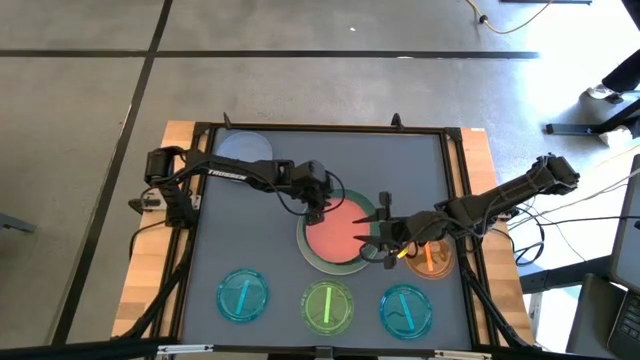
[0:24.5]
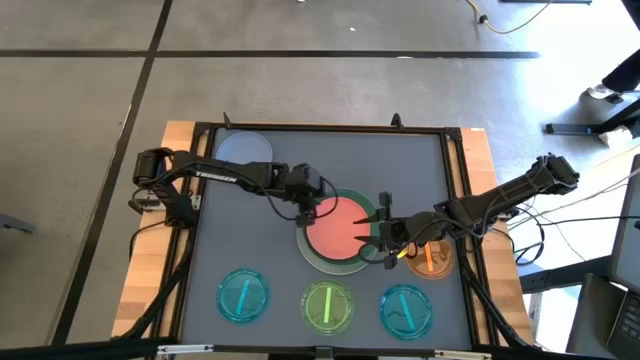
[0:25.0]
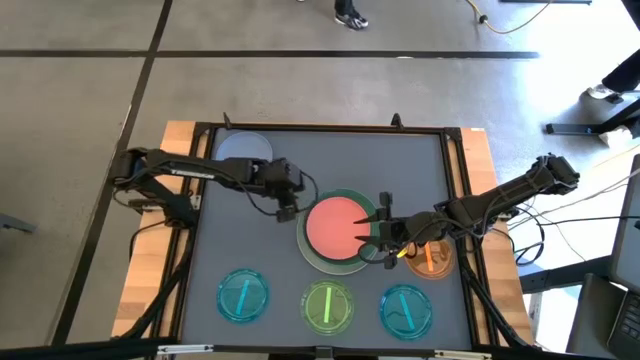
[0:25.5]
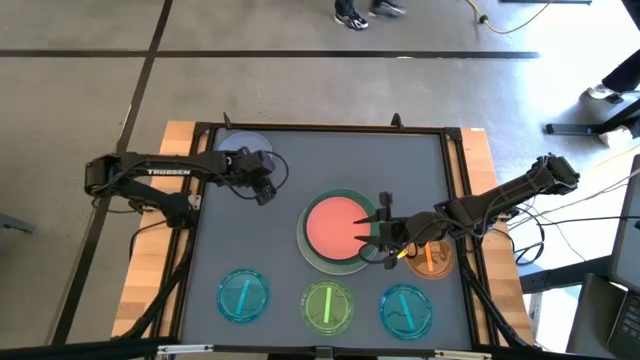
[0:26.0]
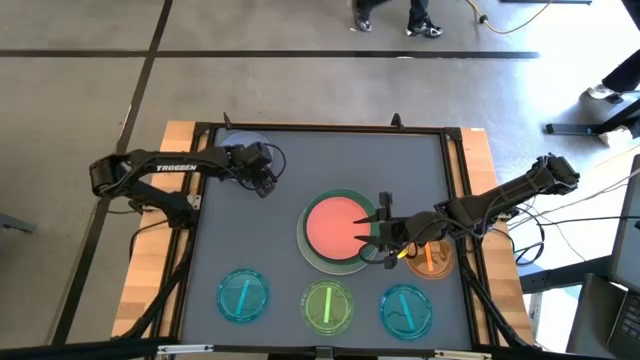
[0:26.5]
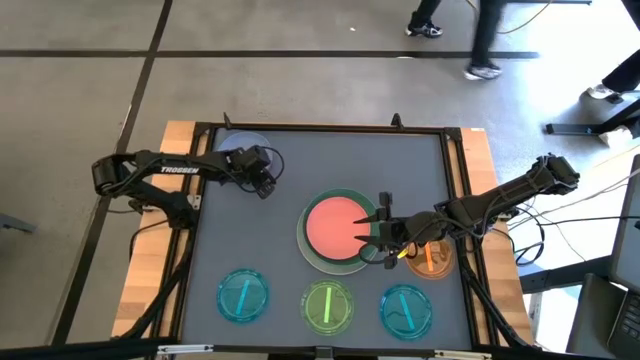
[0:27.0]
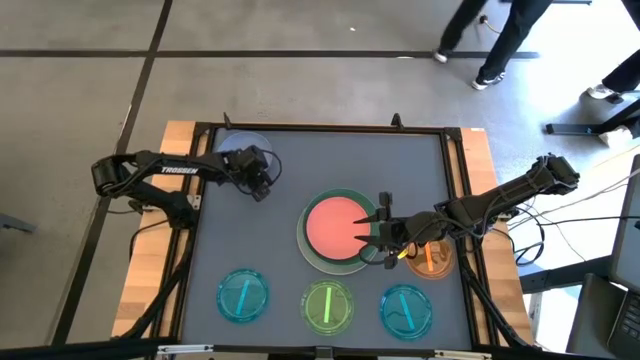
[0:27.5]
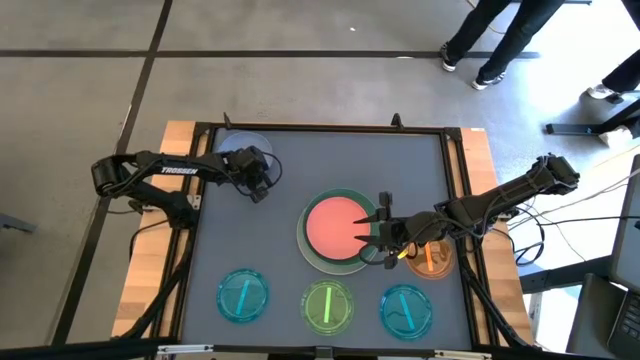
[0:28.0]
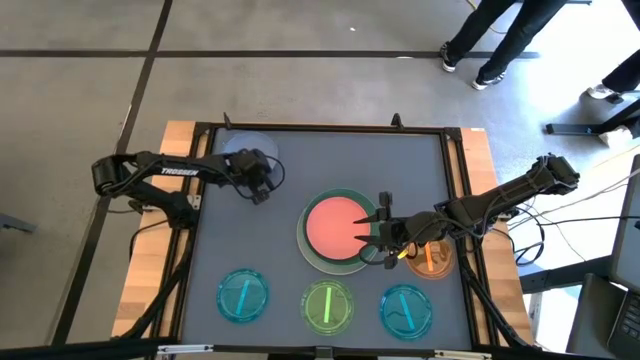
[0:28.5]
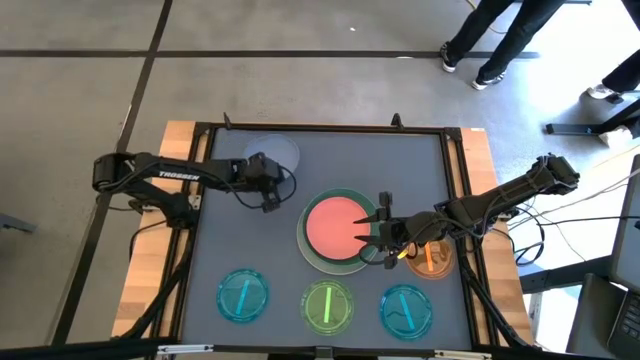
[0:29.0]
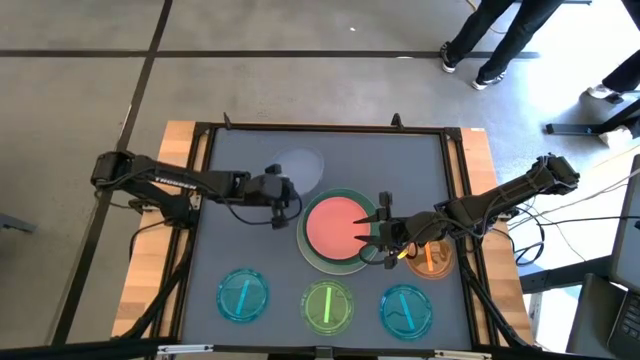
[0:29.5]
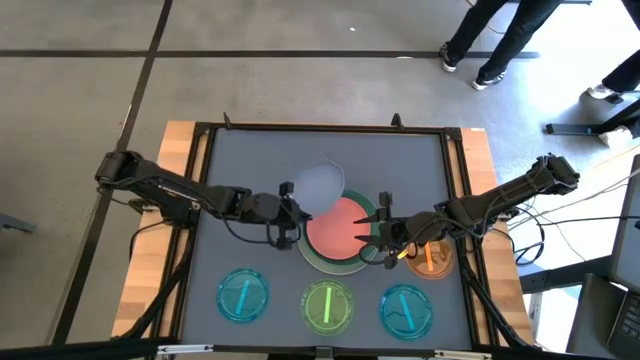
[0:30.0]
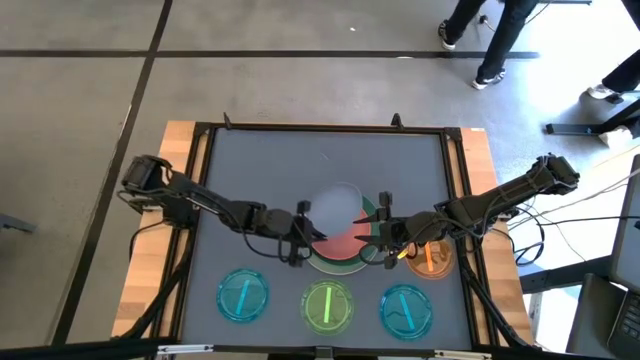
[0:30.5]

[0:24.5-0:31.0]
Task: Stack plastic plates
Stack the gray plate on the light orange plate

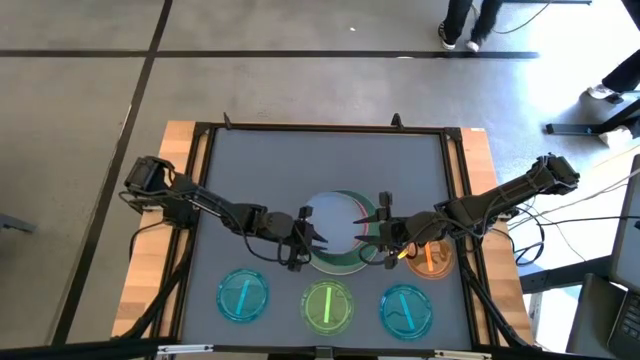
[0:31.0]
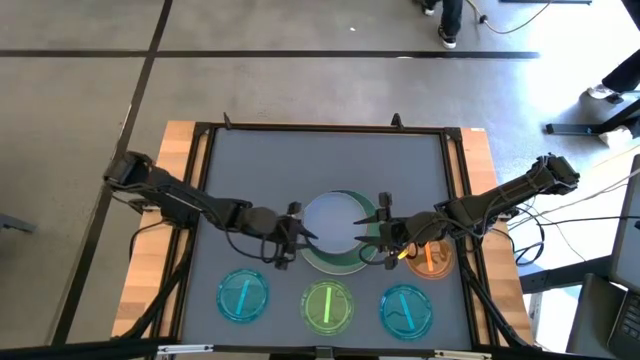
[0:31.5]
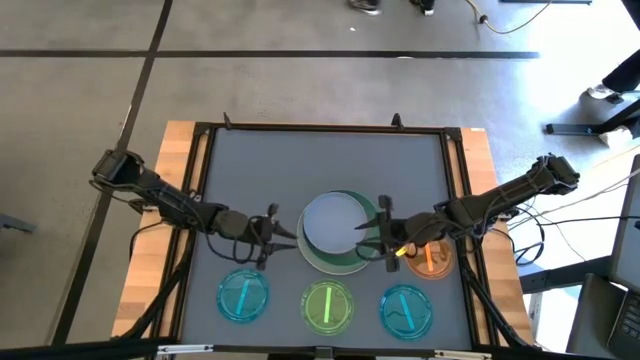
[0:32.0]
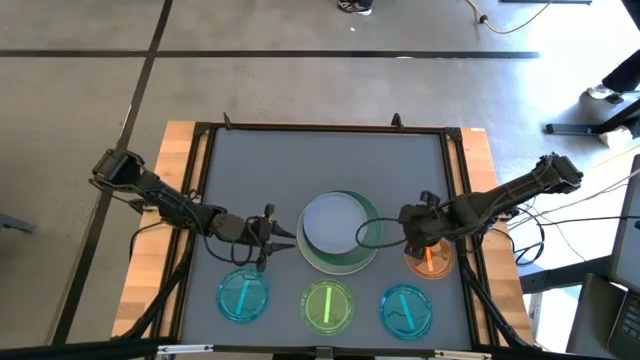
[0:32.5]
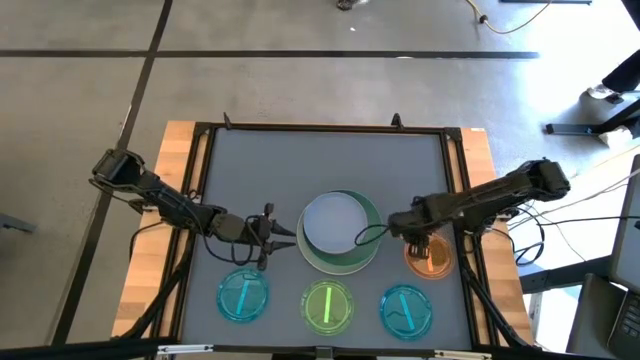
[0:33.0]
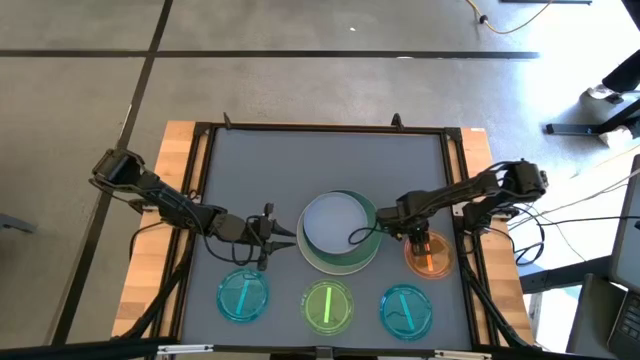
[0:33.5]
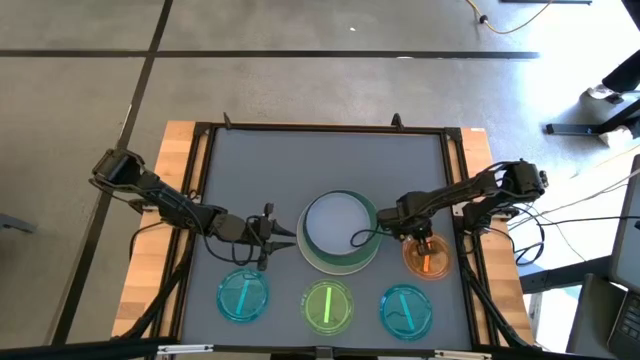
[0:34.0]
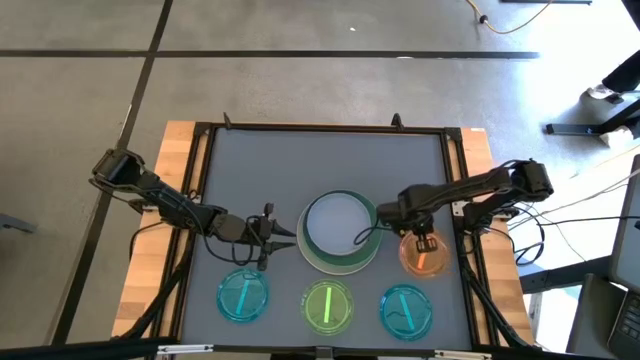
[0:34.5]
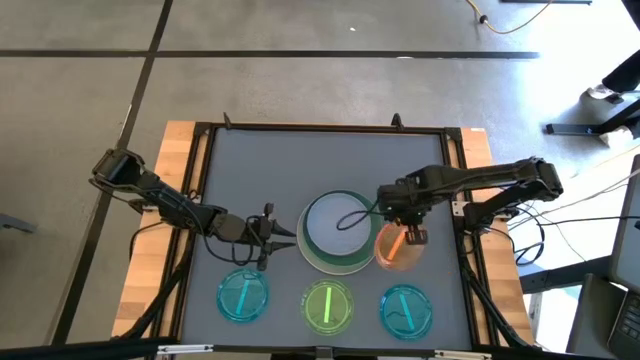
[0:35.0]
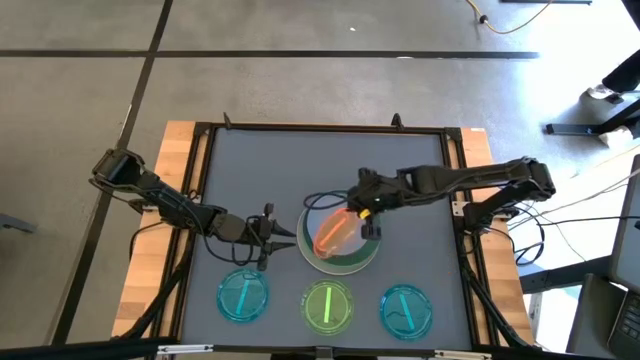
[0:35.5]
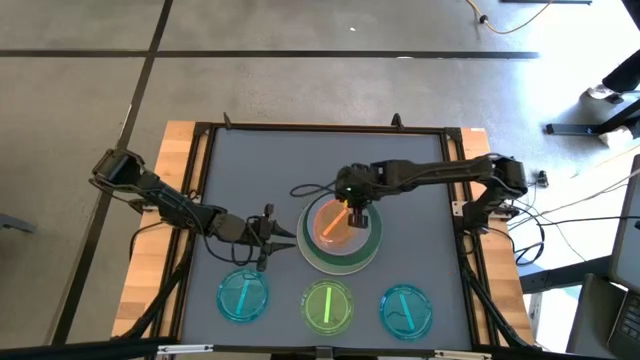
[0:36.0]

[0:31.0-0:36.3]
Stack the light orange plate on the gray plate

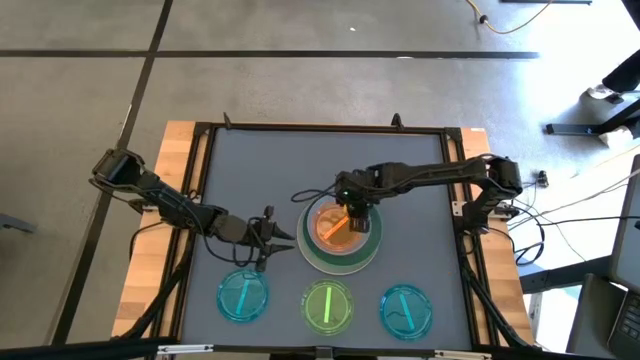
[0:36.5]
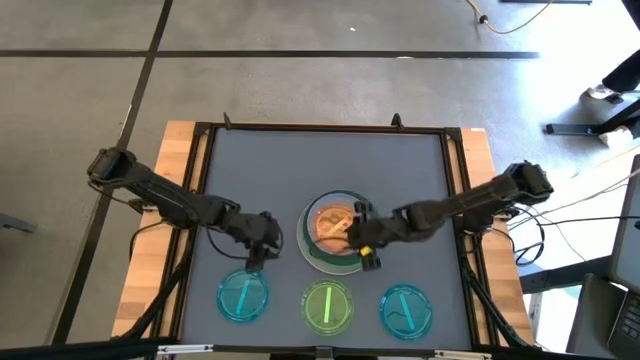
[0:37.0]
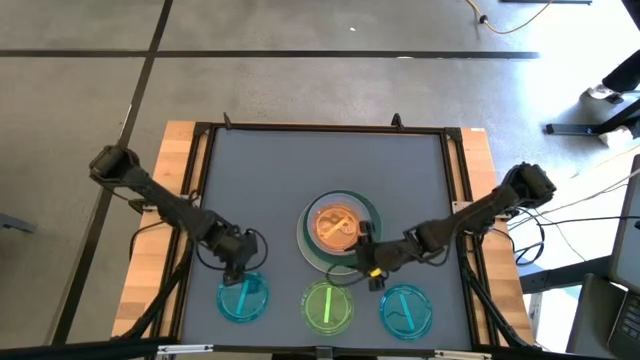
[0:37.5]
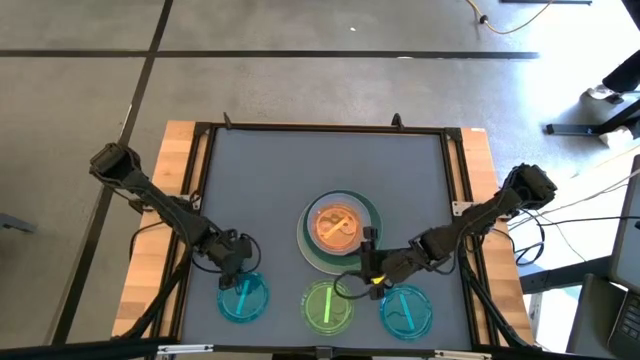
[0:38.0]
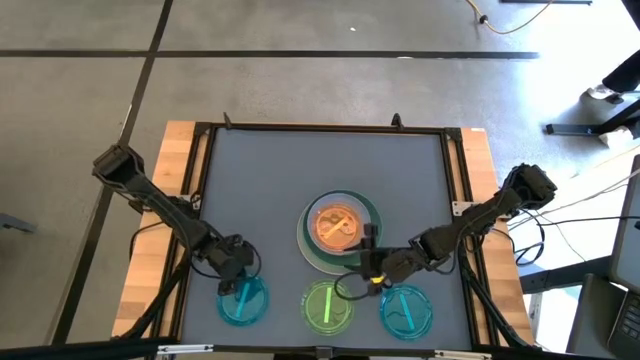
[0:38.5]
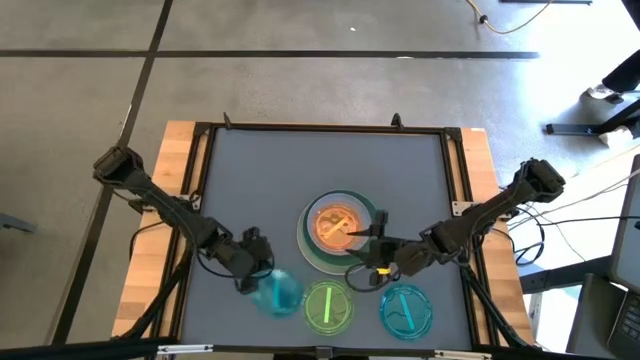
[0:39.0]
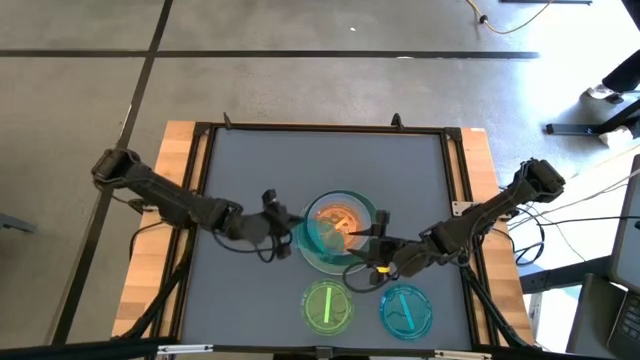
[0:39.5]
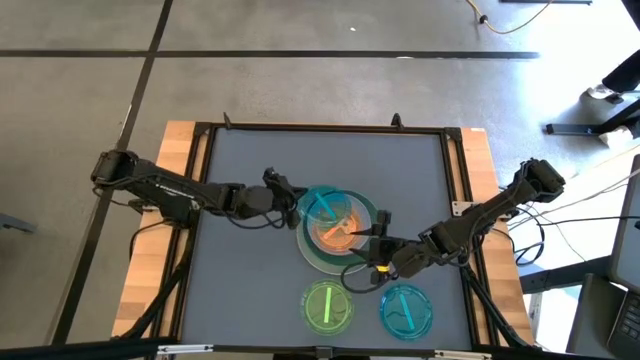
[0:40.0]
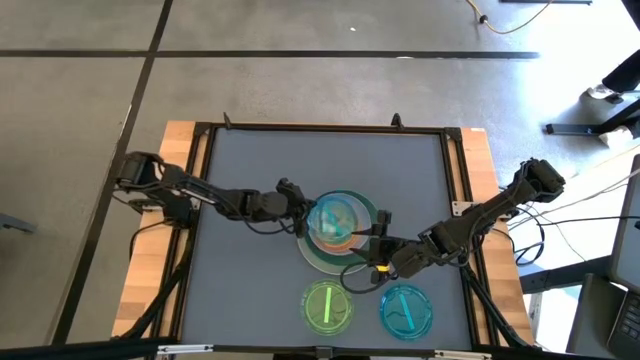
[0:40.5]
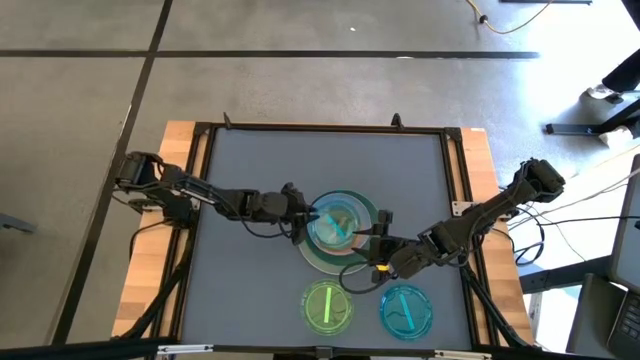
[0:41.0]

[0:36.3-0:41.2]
Stack the left blue plate on the orange plate

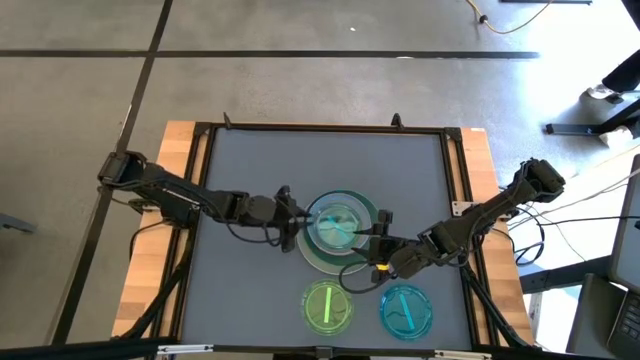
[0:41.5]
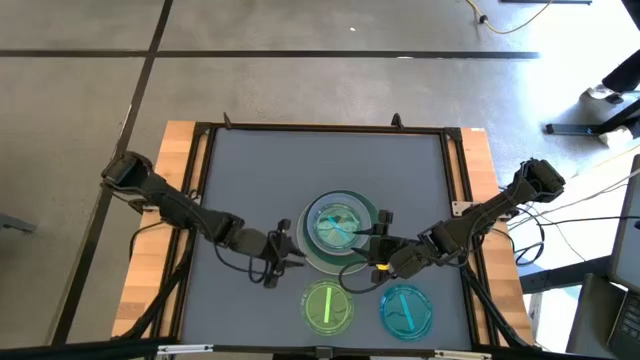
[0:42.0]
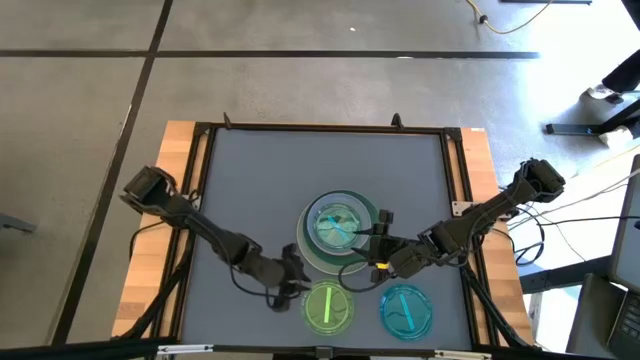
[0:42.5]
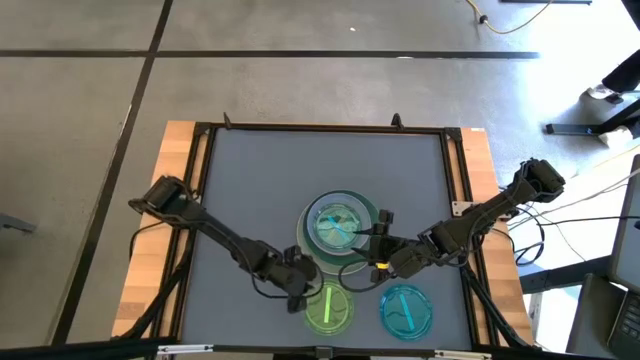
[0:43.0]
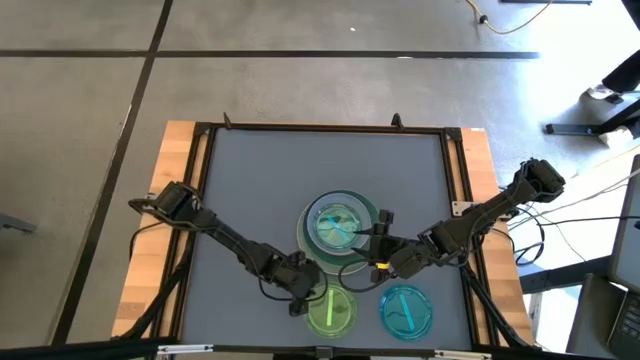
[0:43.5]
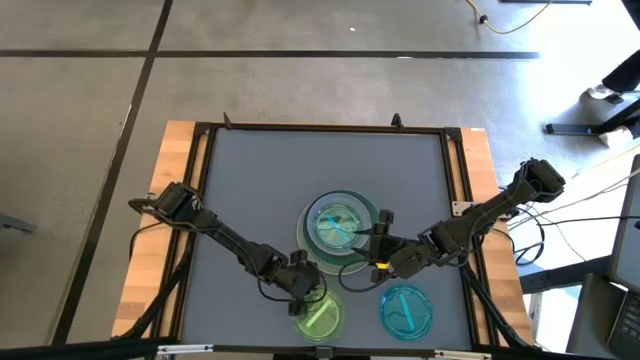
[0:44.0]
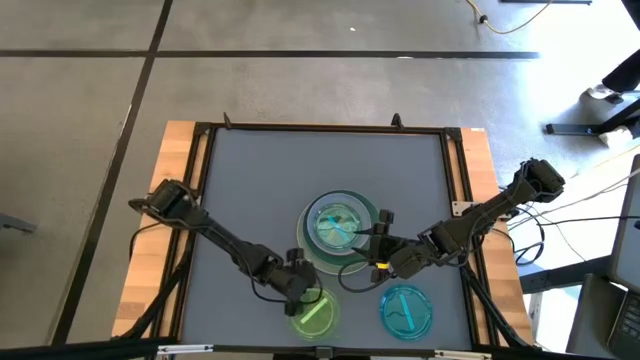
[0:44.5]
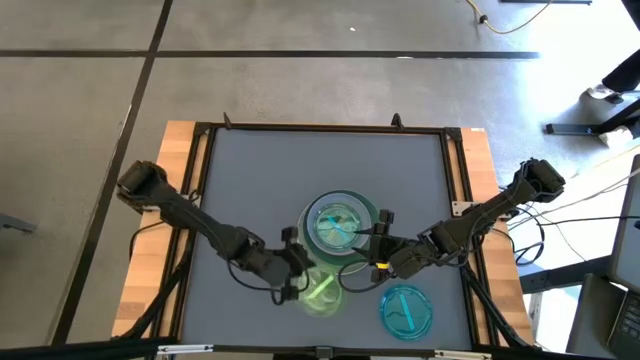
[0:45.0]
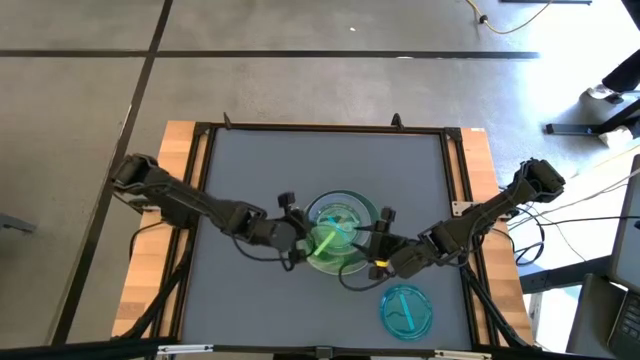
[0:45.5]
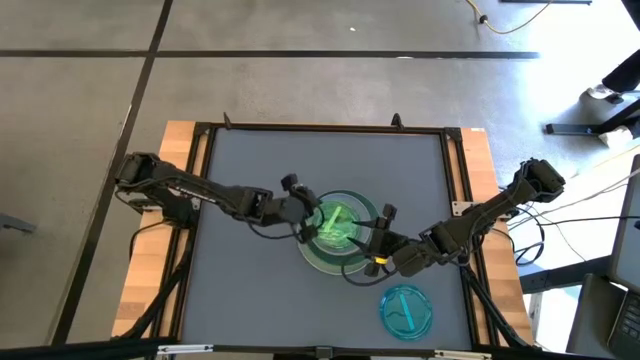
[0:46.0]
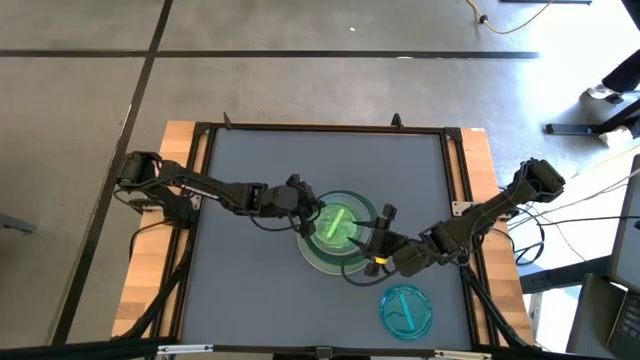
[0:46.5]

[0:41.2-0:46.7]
Stack the green plate on the blue plate
